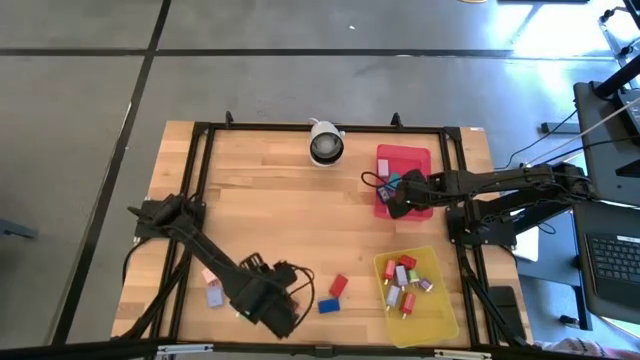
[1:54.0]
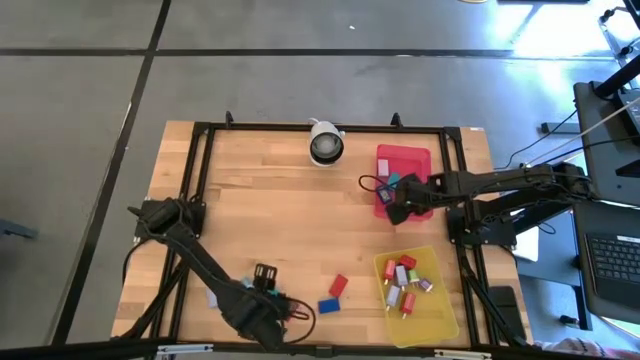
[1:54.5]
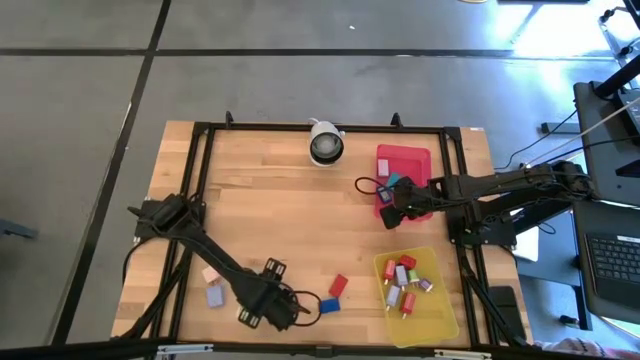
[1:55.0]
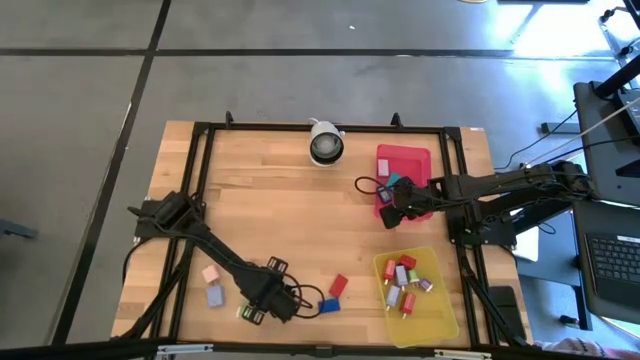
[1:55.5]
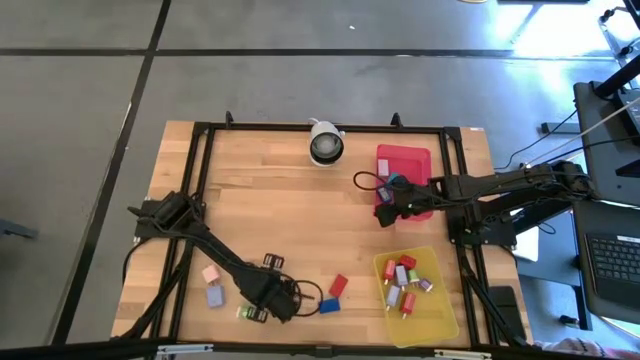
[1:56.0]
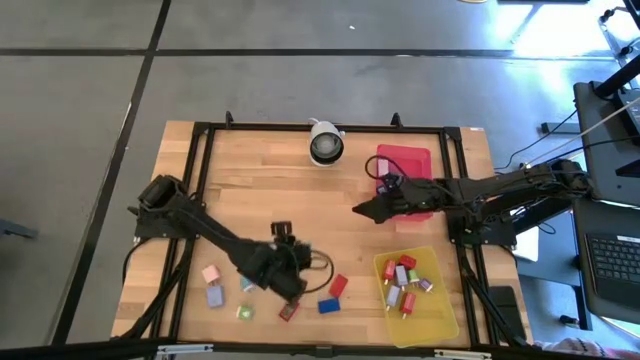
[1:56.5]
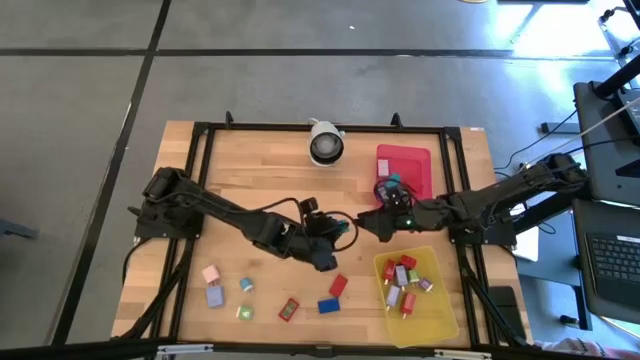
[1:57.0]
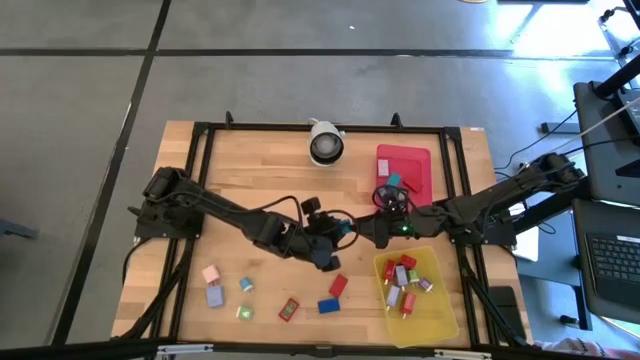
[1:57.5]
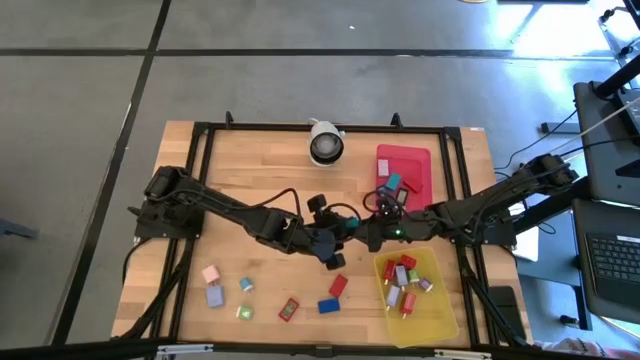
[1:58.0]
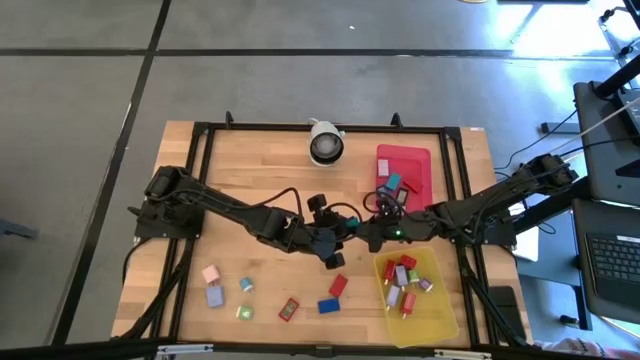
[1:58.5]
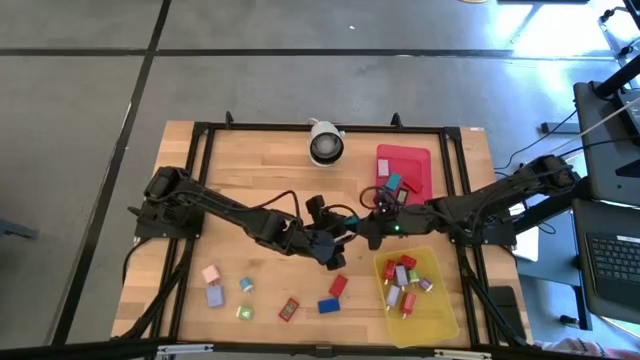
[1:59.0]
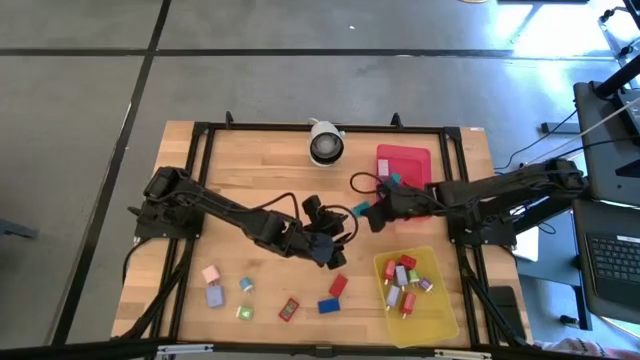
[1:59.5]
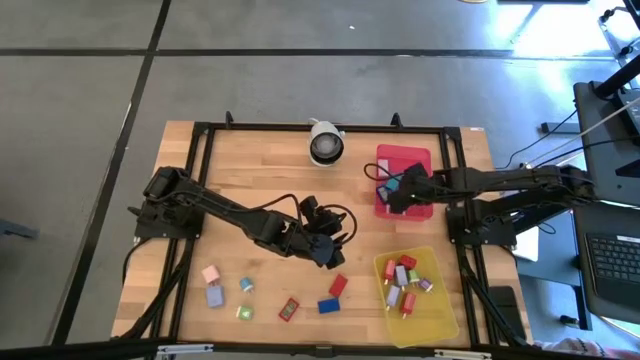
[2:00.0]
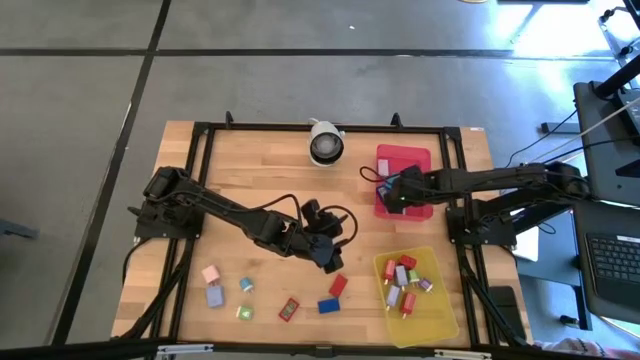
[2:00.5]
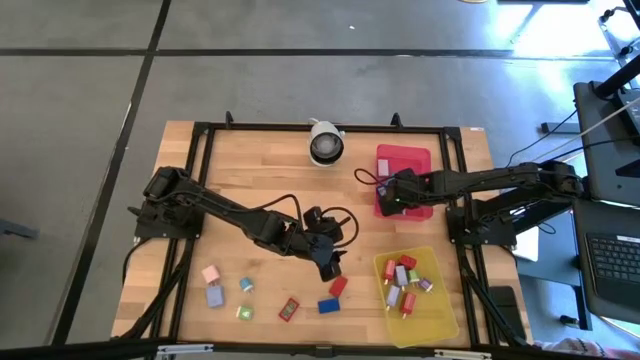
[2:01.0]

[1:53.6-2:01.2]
Task: Pick & Place Office items
Put the light blue digital timer into the pink bin

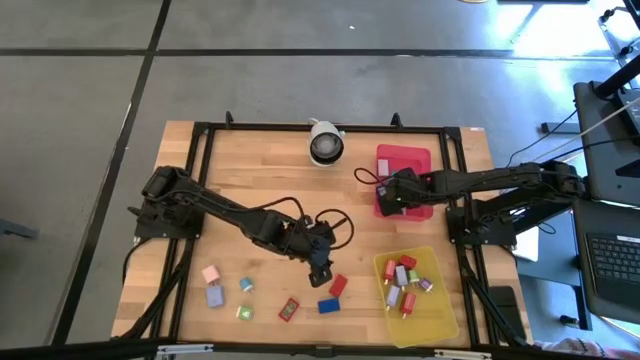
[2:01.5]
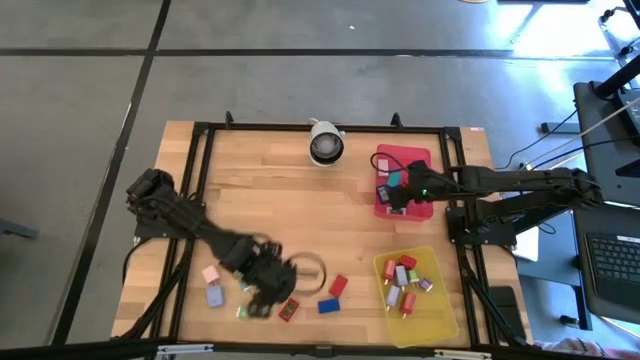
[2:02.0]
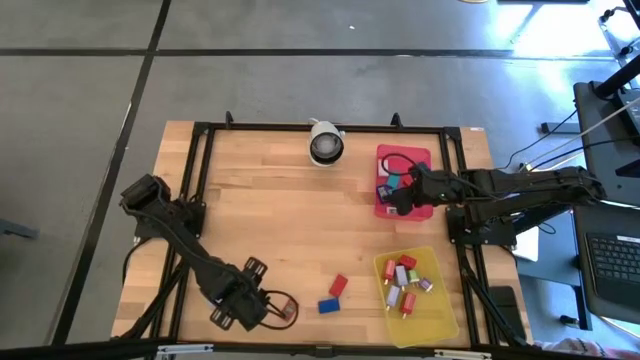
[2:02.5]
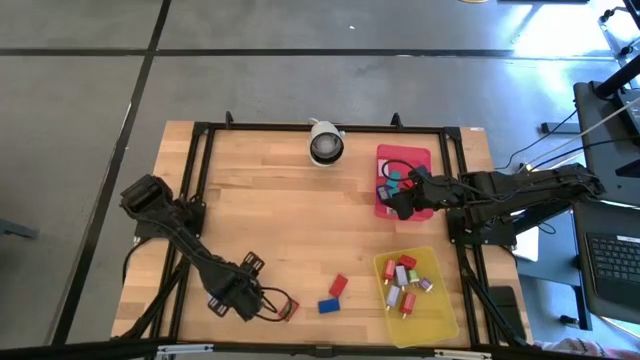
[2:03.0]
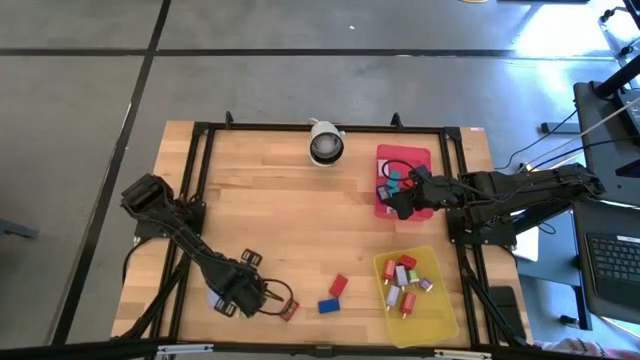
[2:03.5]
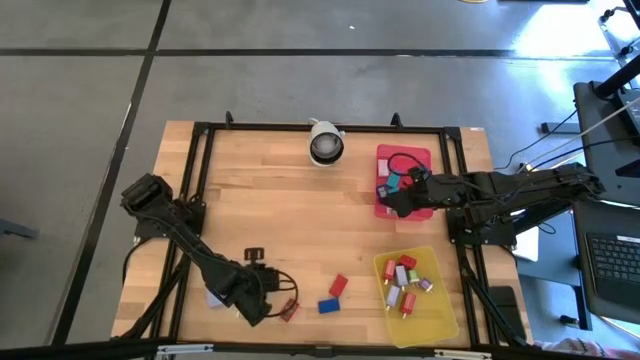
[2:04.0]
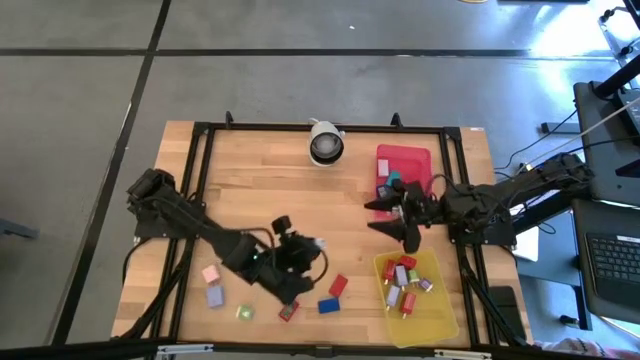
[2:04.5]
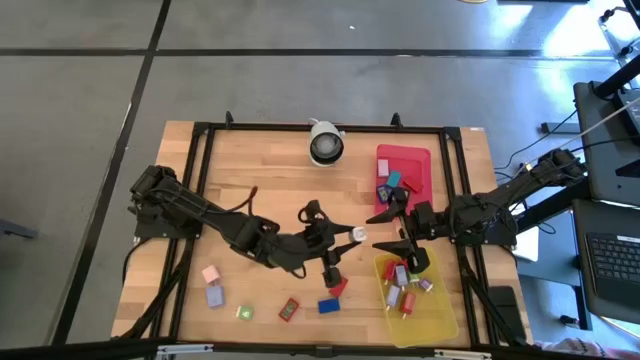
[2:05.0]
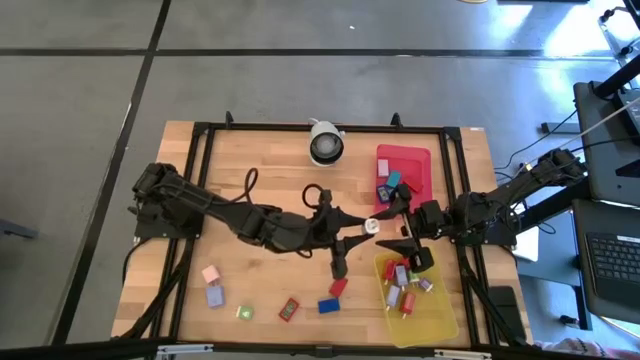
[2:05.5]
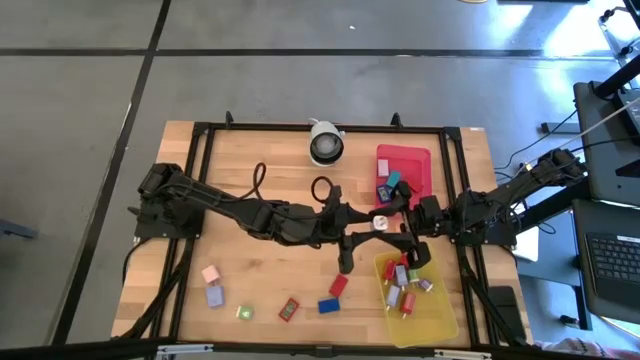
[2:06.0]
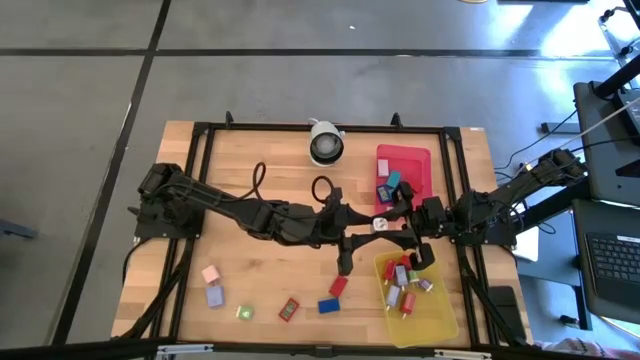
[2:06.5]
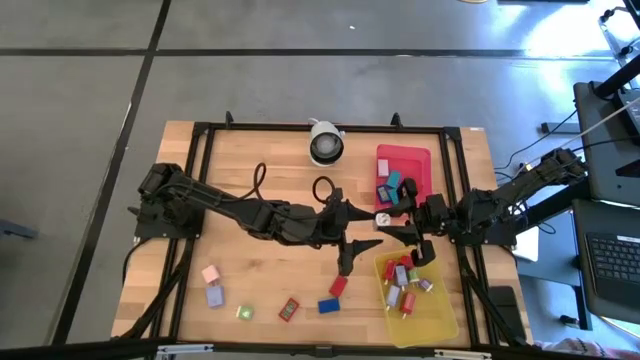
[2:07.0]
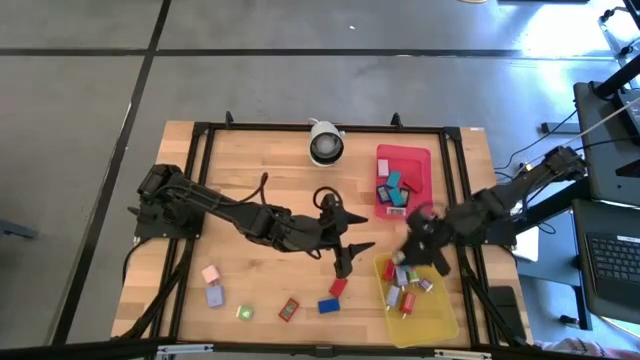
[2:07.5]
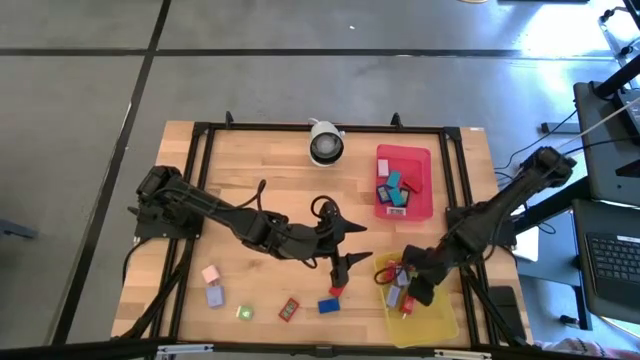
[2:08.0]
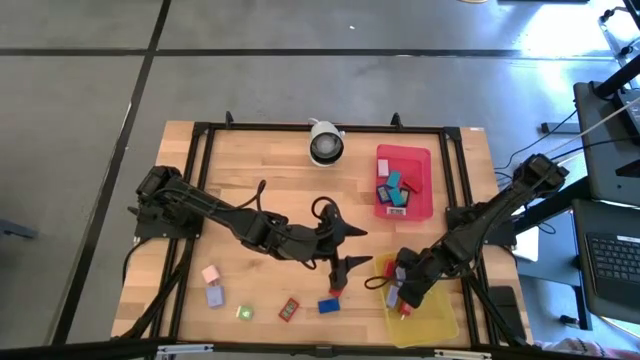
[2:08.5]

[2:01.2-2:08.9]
Put the blue charger adapter into the pink bin

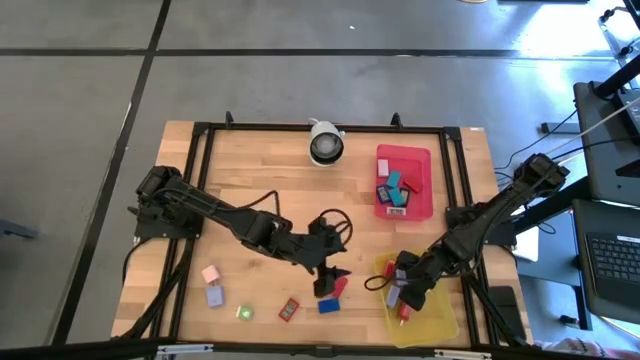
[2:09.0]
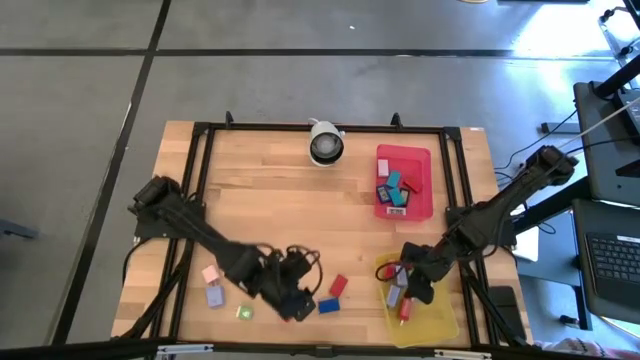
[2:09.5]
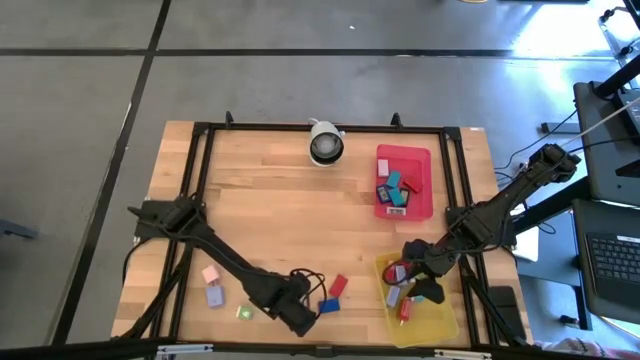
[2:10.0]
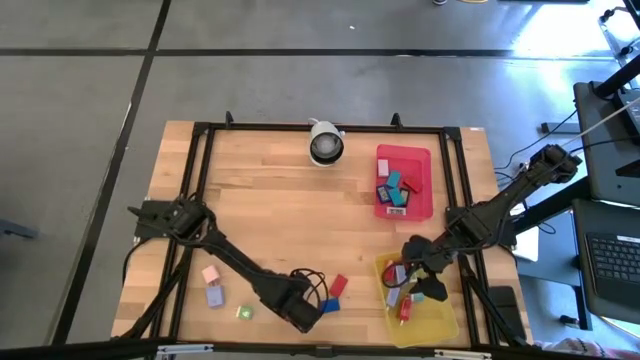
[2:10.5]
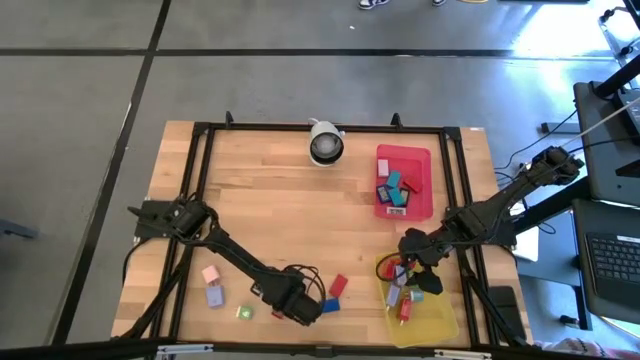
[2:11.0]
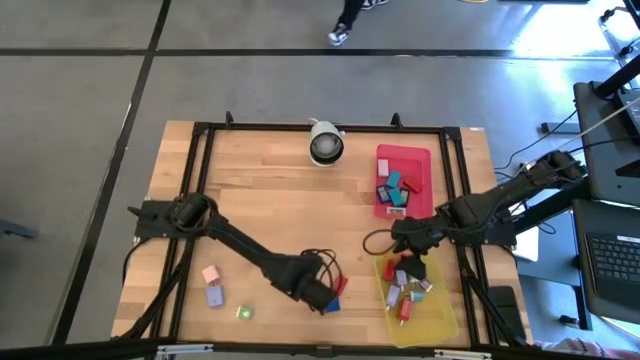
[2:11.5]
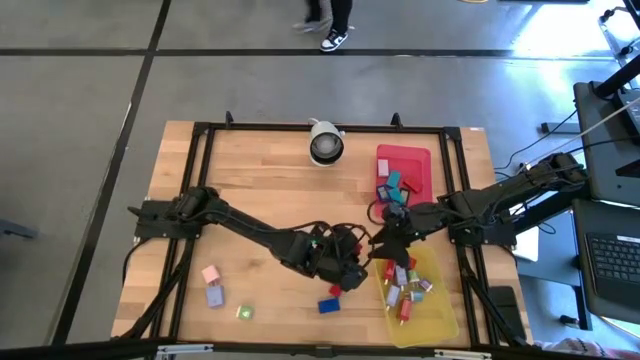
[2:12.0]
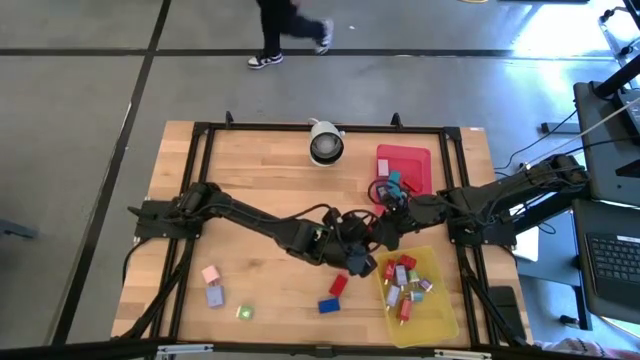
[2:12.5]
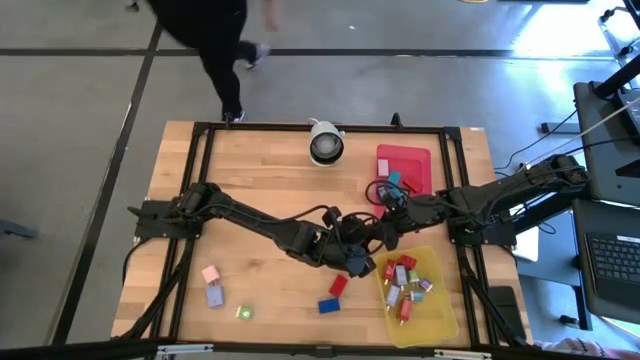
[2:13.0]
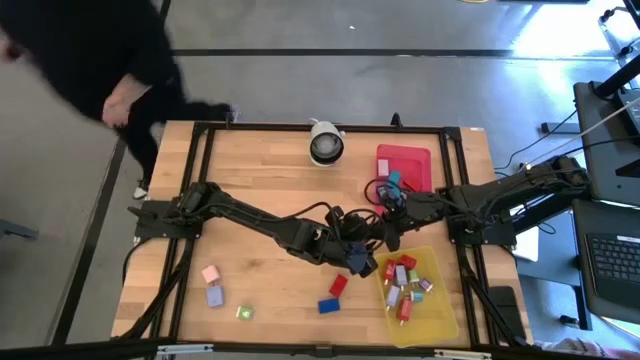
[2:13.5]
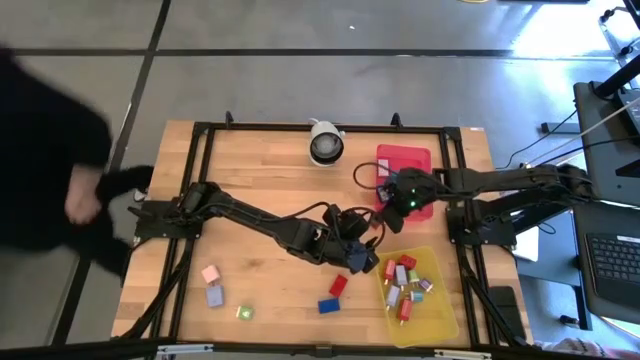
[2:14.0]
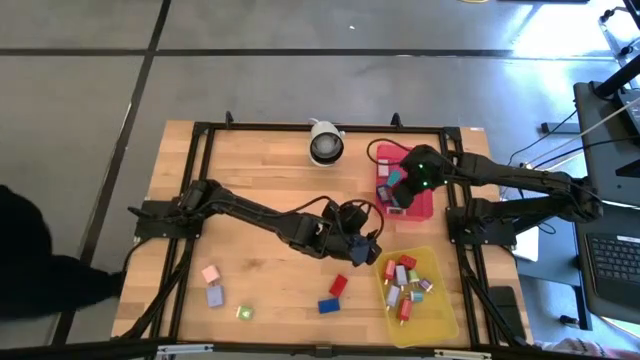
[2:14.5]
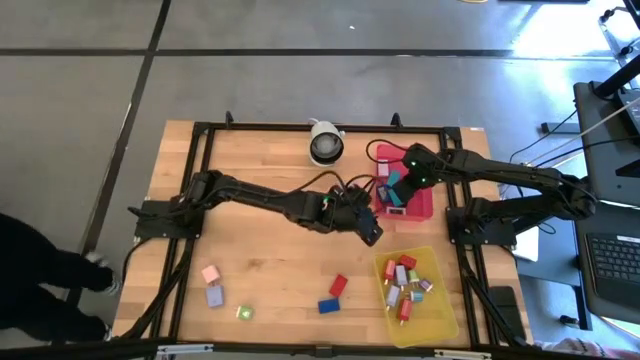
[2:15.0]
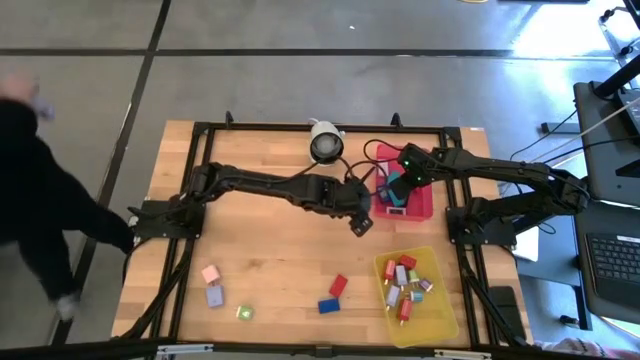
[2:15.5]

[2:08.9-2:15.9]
Put the left red digital timer into the pink bin
